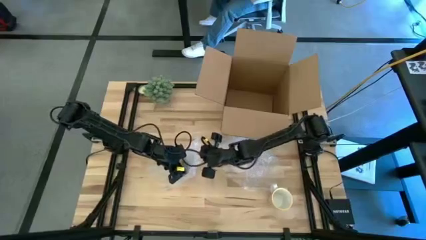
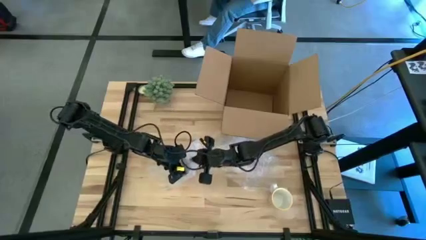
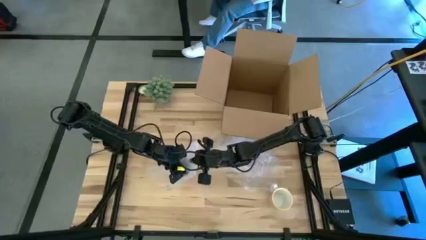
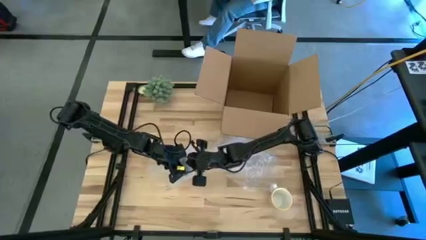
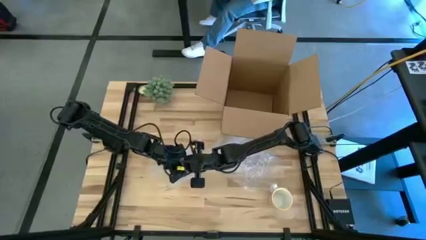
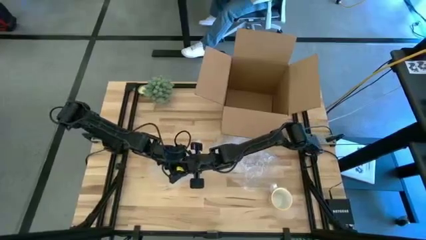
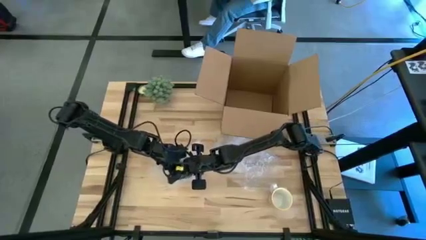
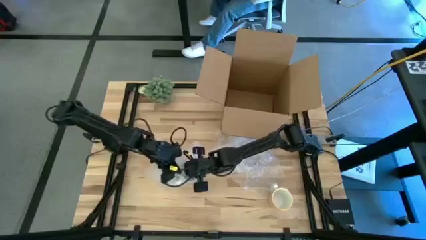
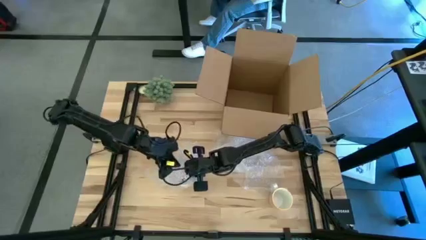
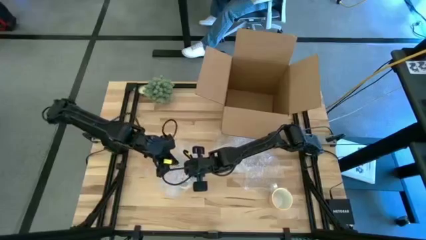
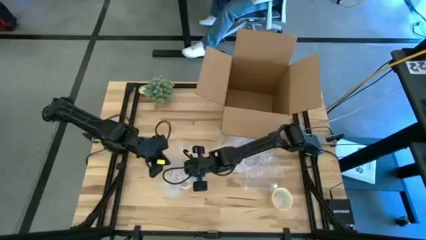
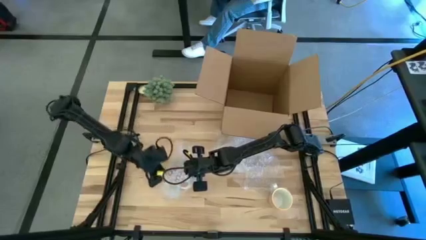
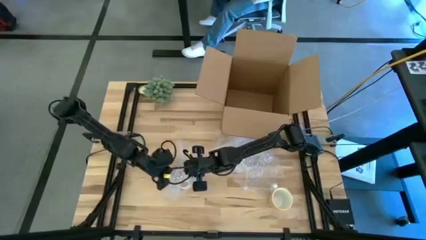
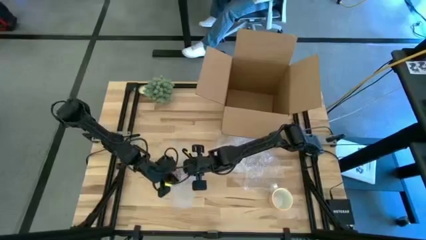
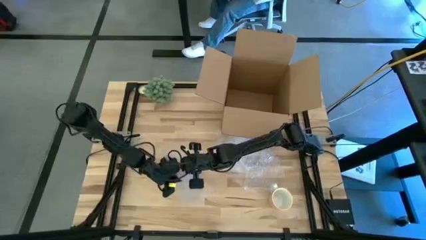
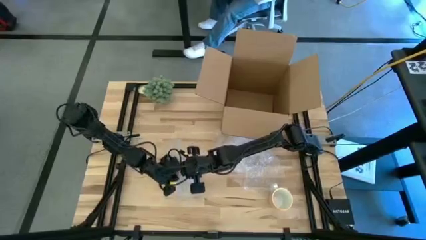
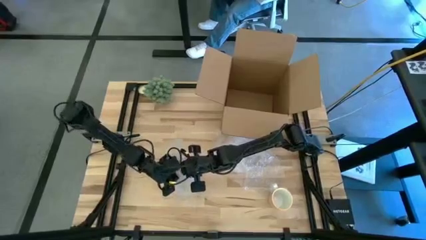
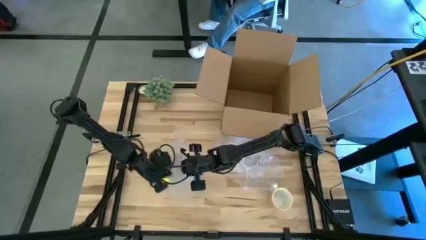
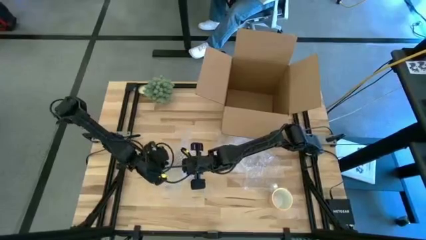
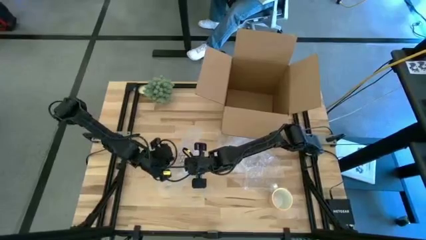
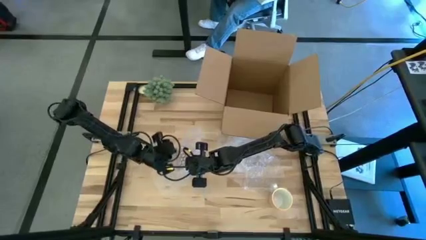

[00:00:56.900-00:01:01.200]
Task: wrap mug
Wrap the red patterned mug with the bubble wrap

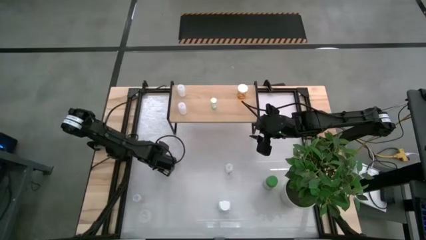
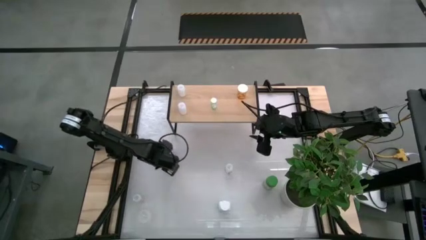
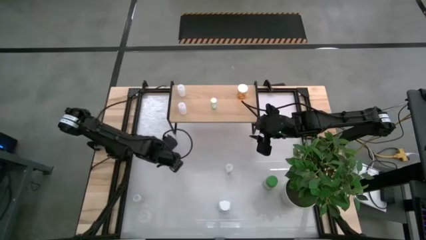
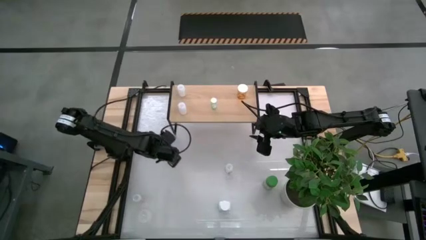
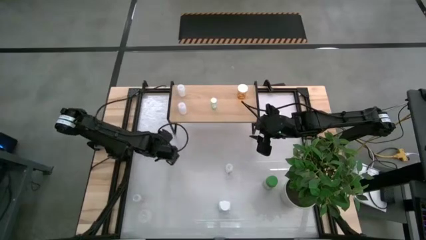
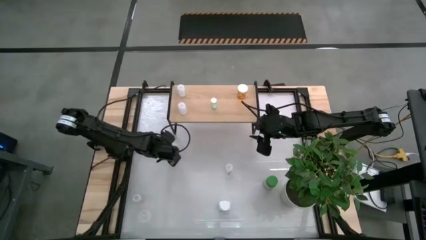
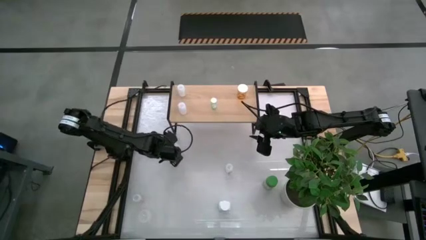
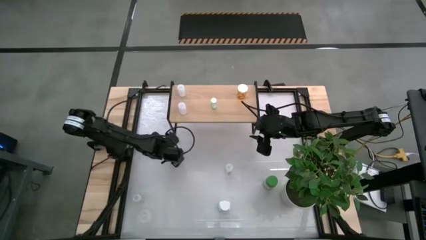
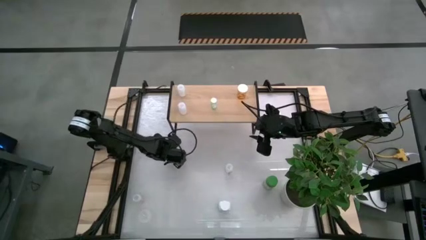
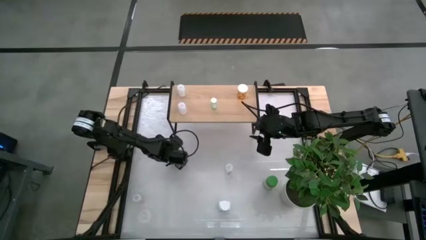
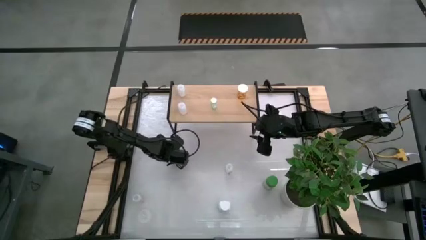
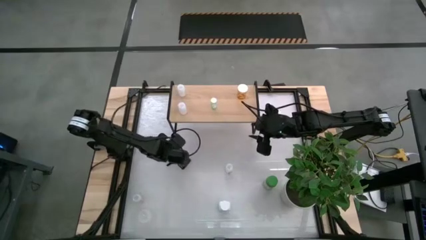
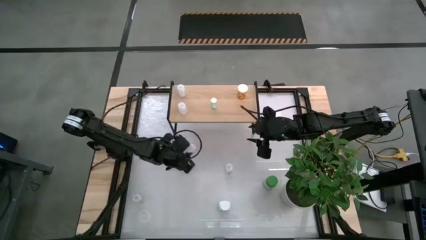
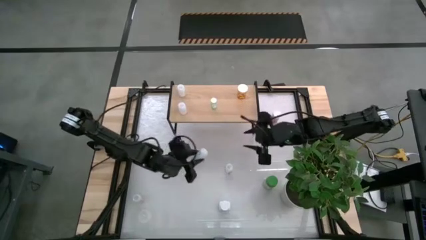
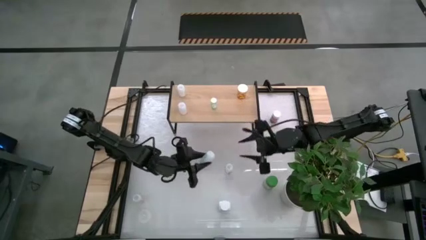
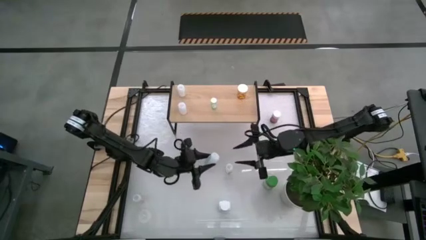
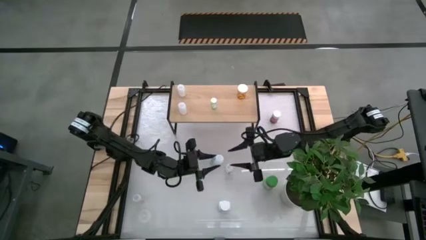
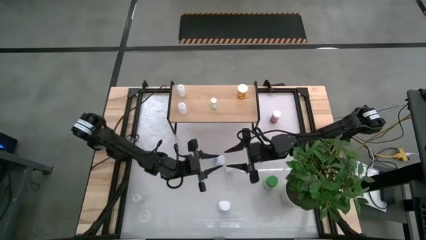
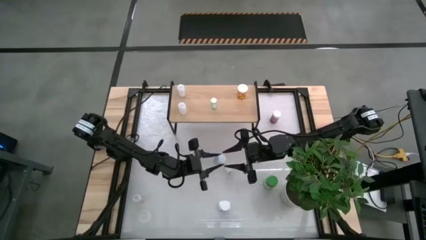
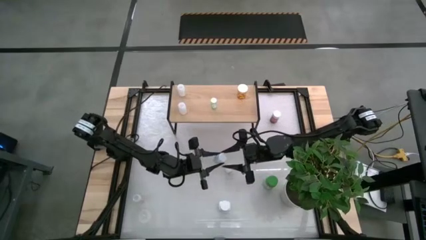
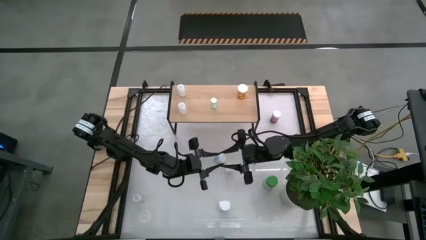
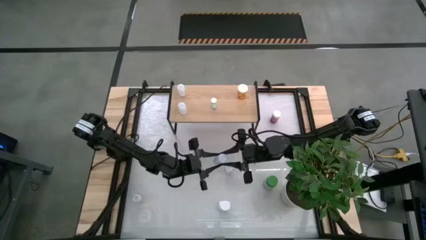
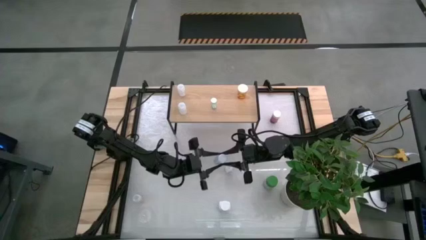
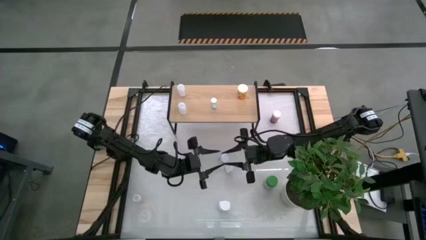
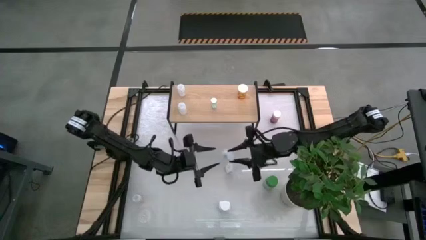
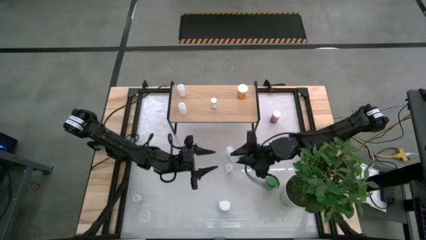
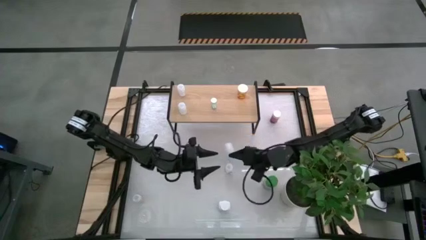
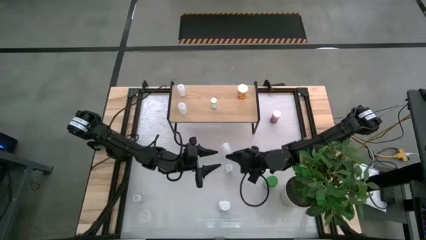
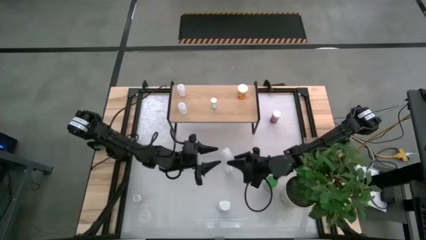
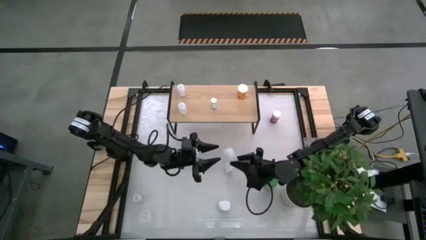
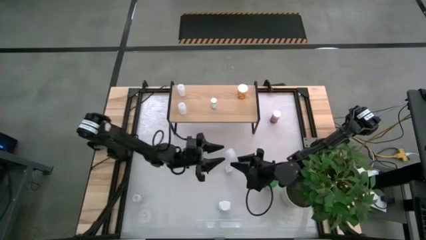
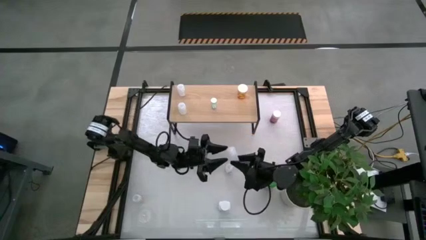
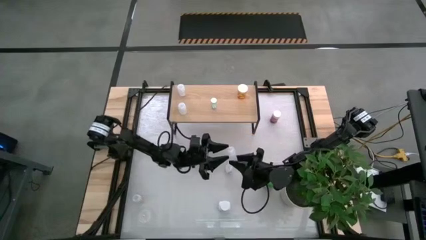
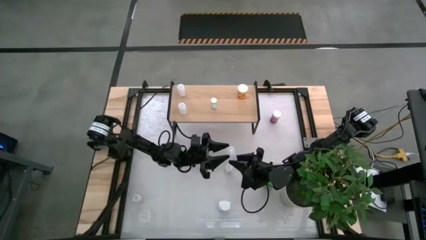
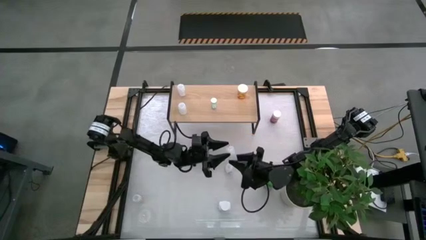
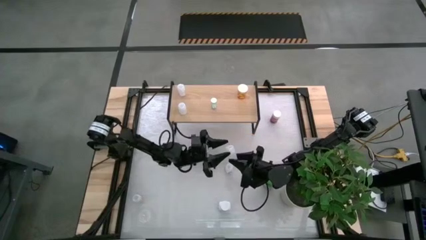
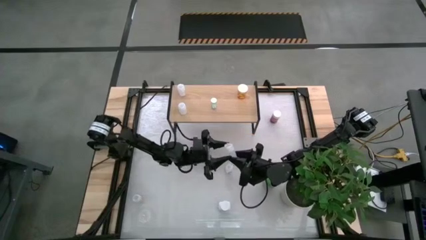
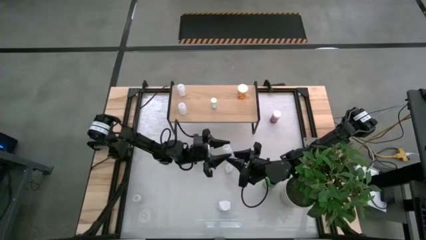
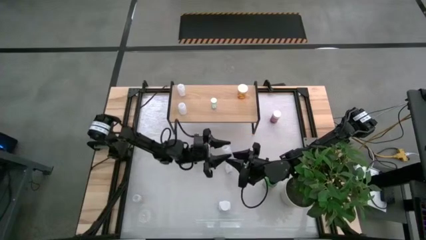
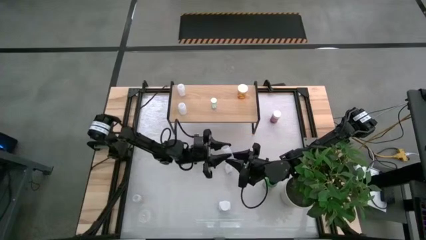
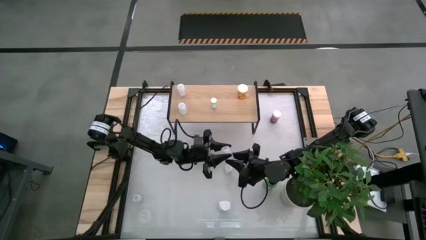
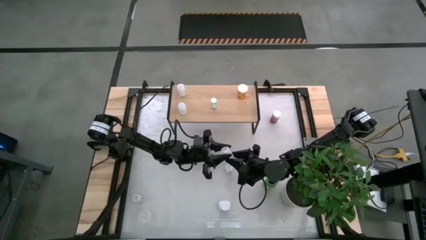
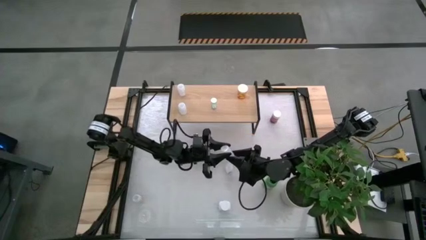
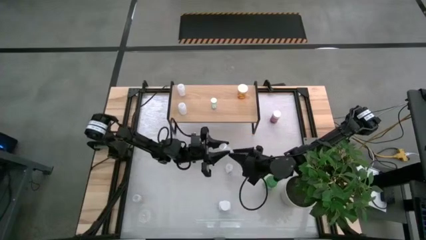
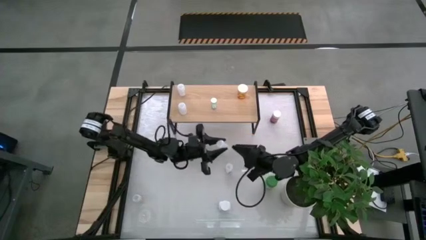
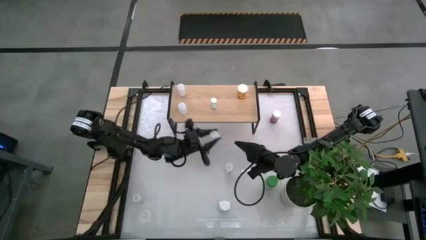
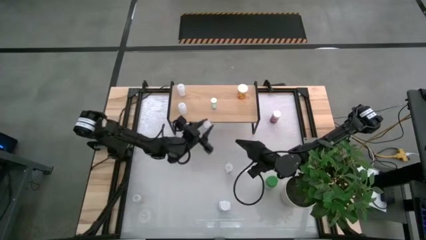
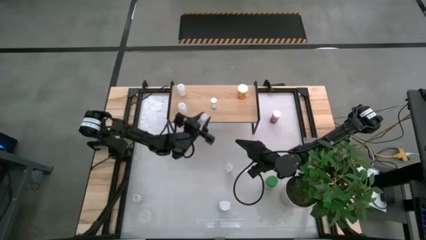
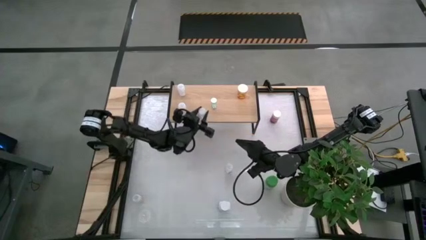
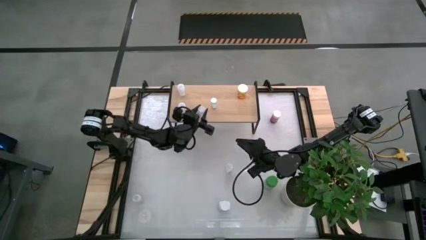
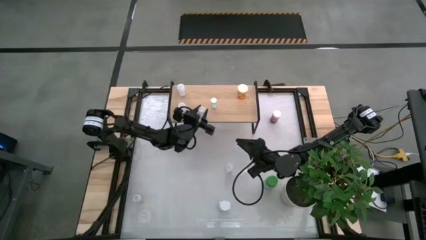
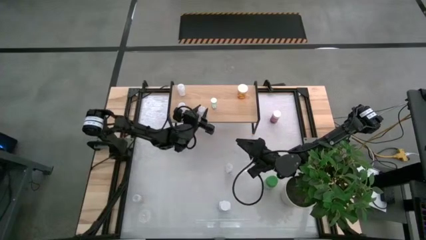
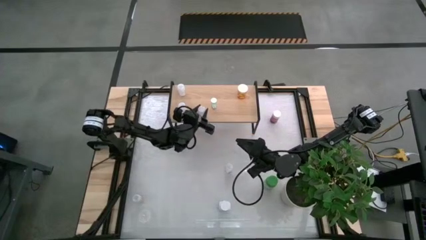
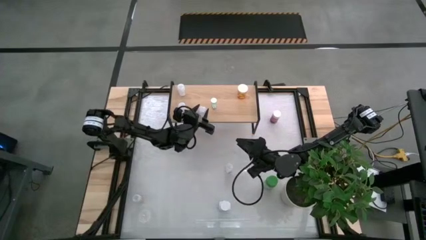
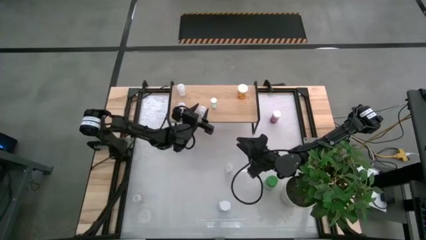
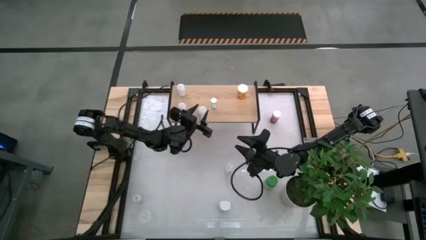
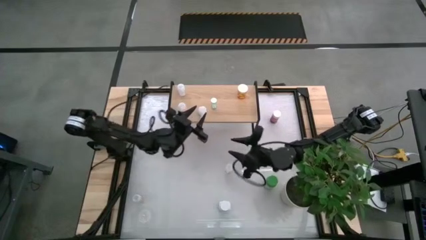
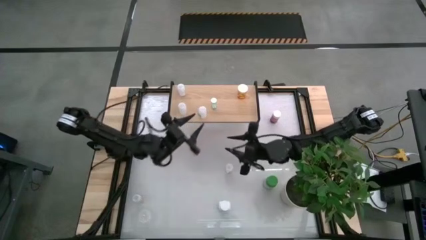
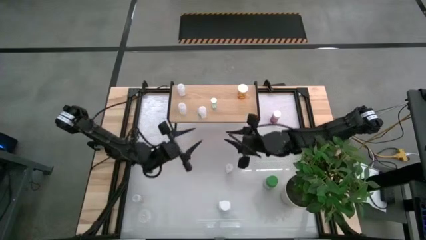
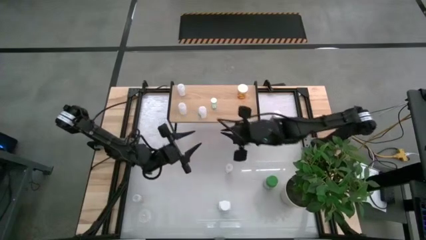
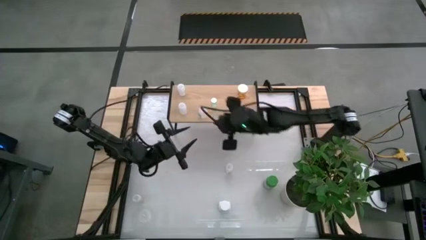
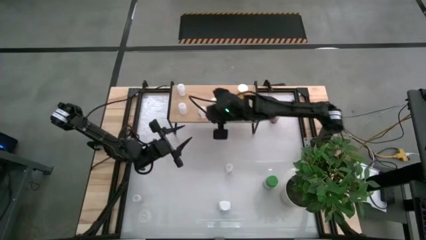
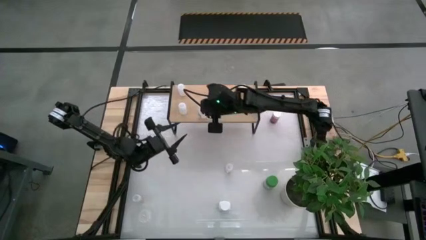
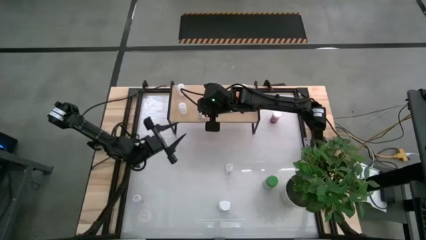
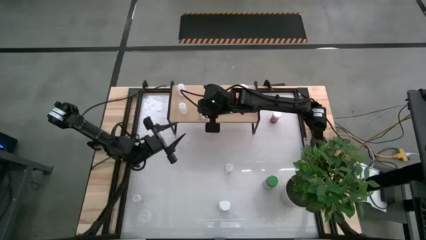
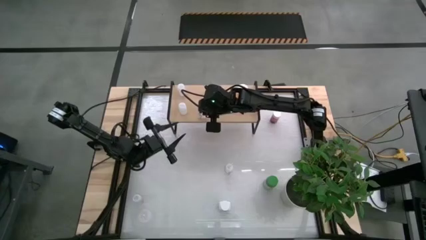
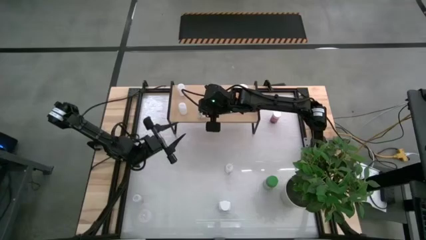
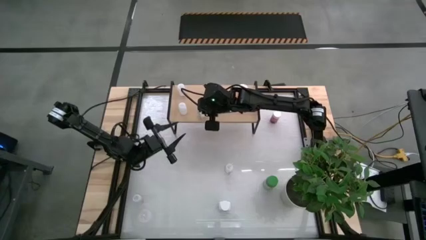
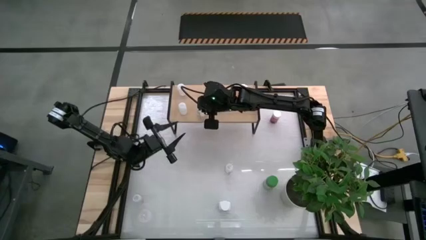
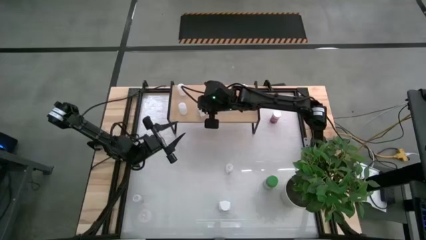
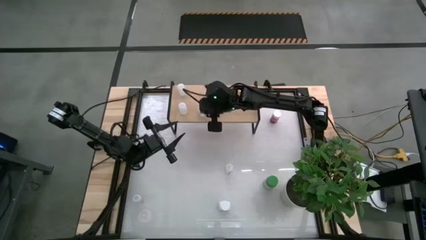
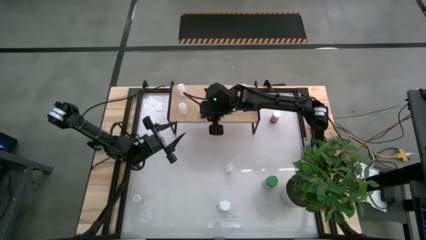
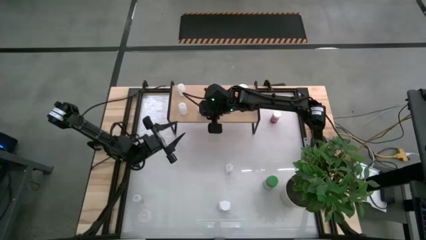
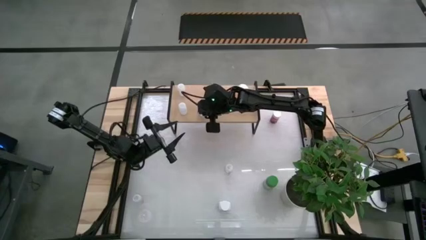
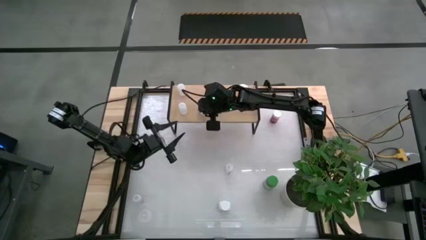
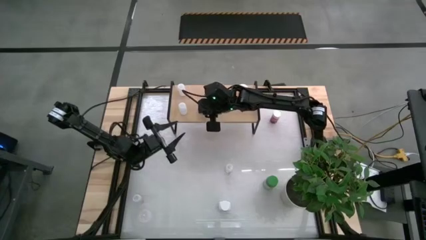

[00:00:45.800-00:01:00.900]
Task: Pick and place medicine bottles onto shelf by color
Put the white pill bottle on the shelf
